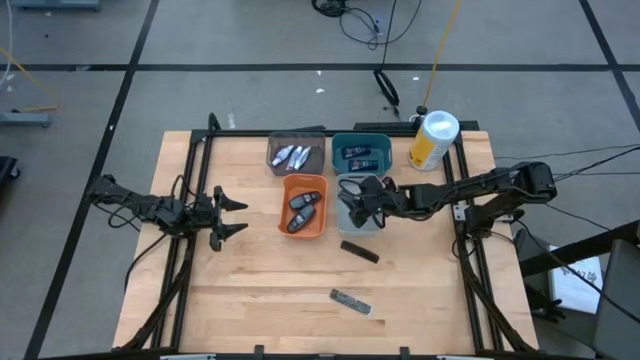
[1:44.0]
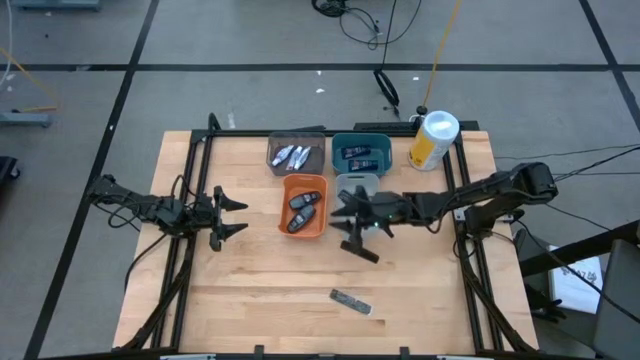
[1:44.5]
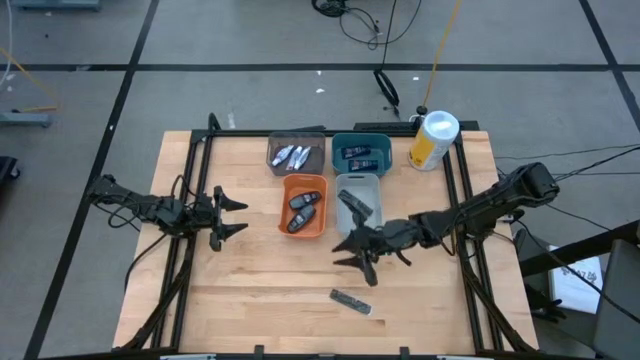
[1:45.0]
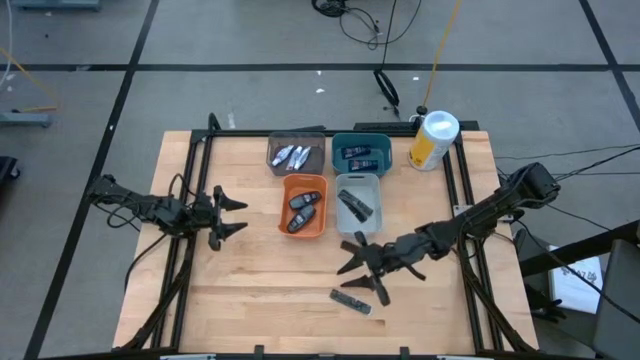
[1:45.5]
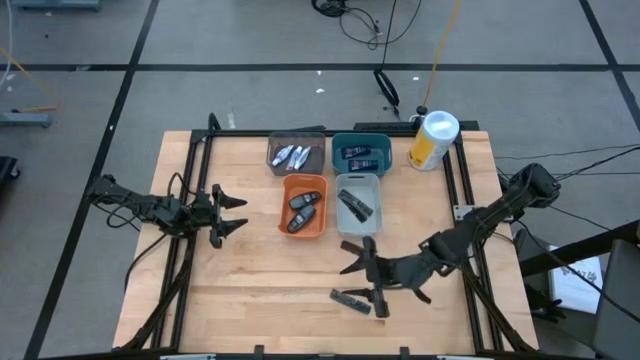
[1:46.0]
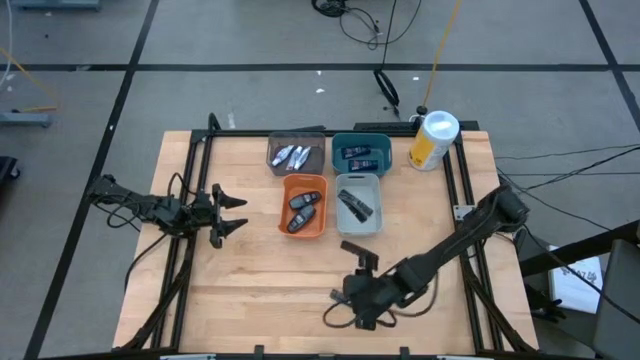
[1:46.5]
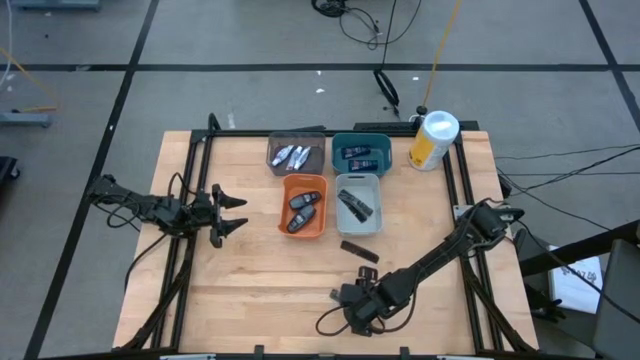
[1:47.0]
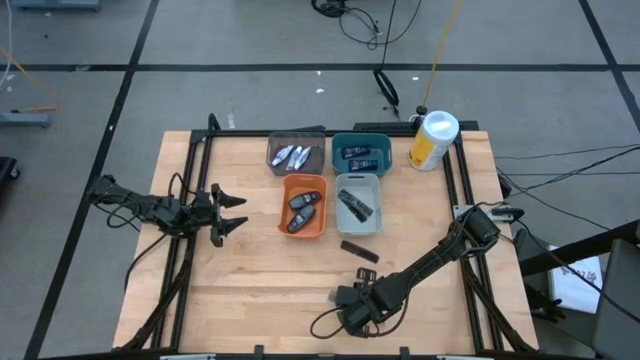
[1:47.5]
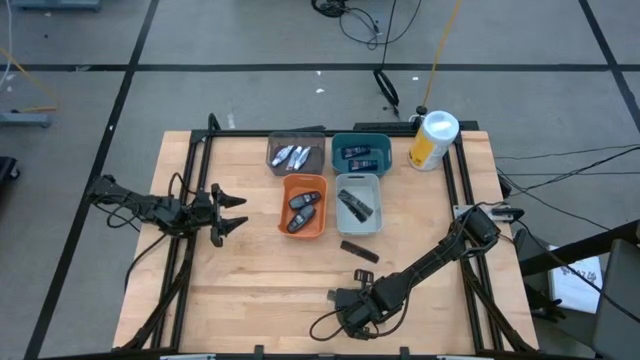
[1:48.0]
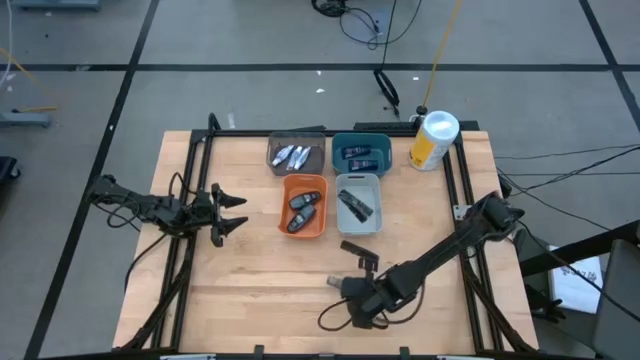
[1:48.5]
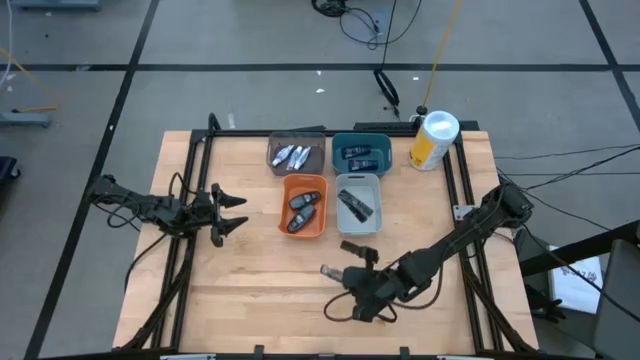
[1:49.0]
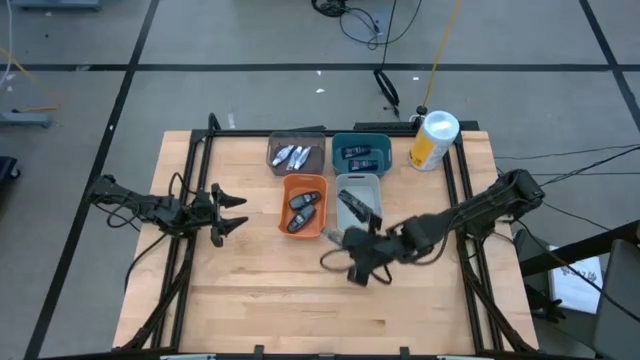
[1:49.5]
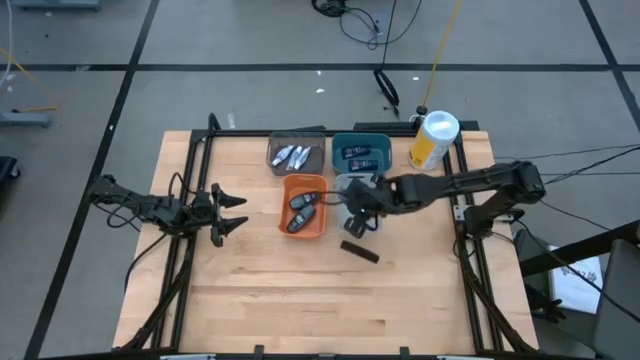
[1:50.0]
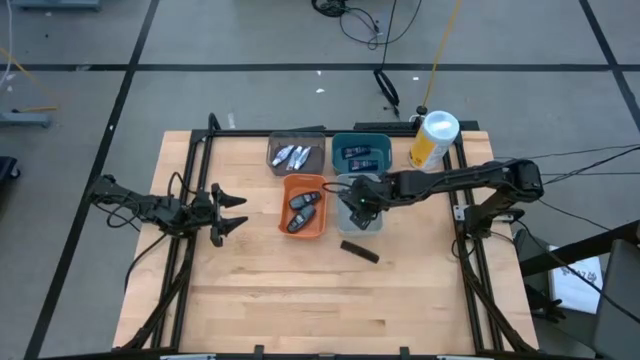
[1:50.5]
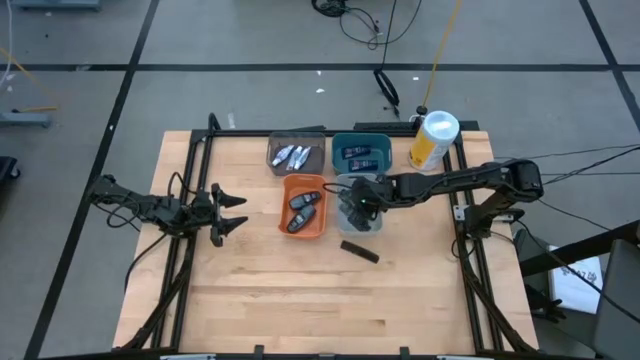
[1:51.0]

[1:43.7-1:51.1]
Task: Pick & Place Travel size toiletries
Put the black comb into the gray bin

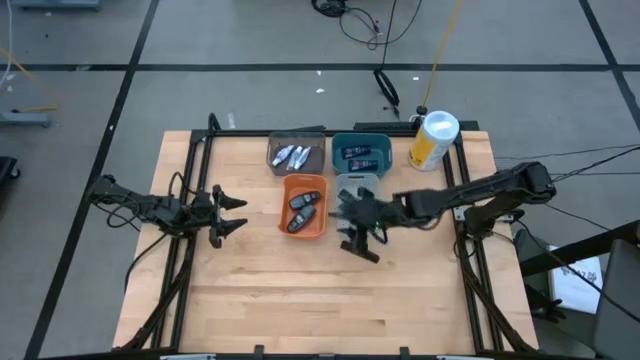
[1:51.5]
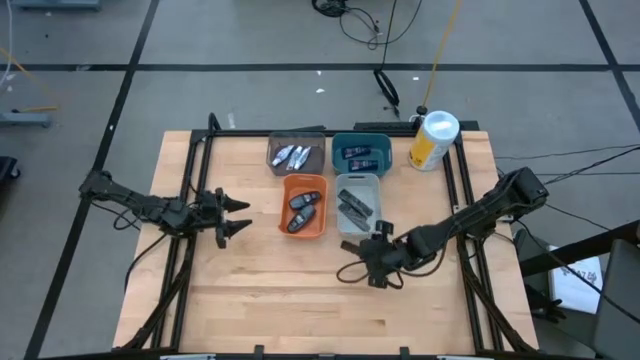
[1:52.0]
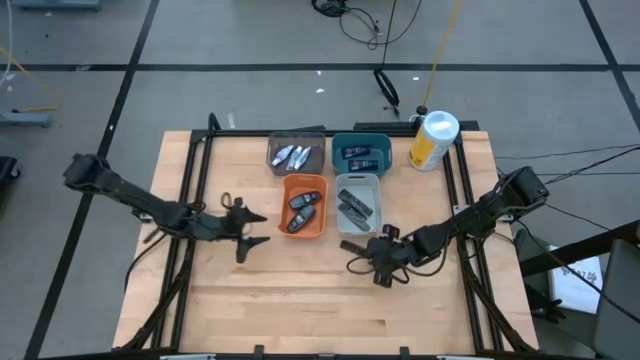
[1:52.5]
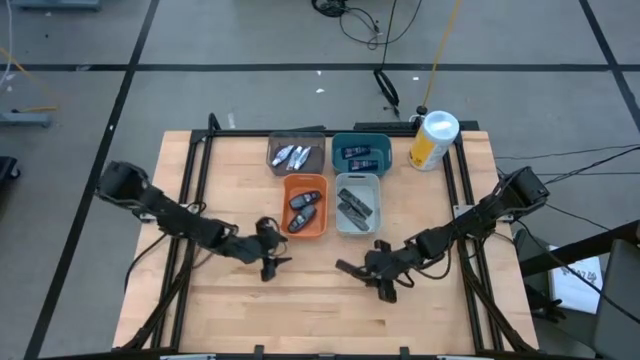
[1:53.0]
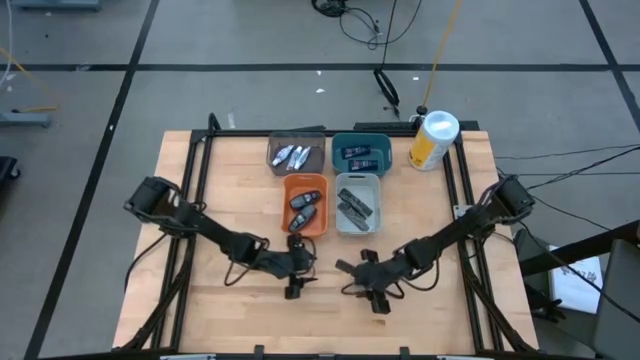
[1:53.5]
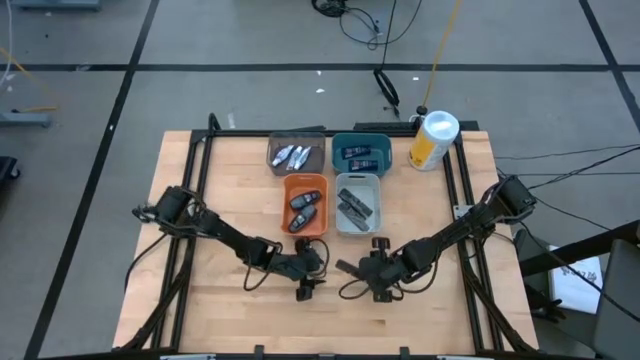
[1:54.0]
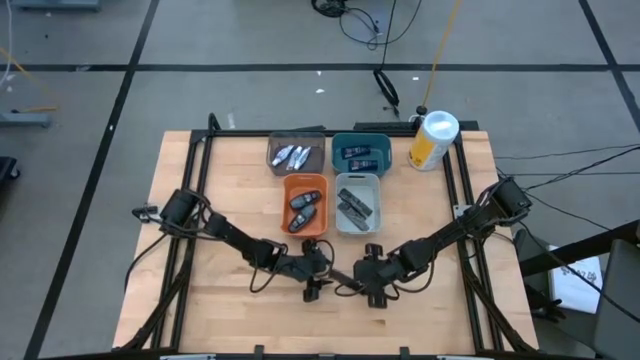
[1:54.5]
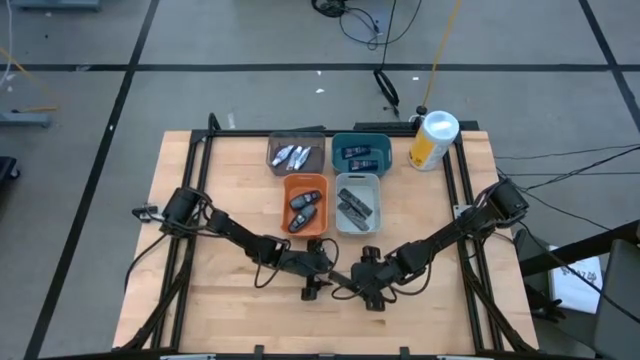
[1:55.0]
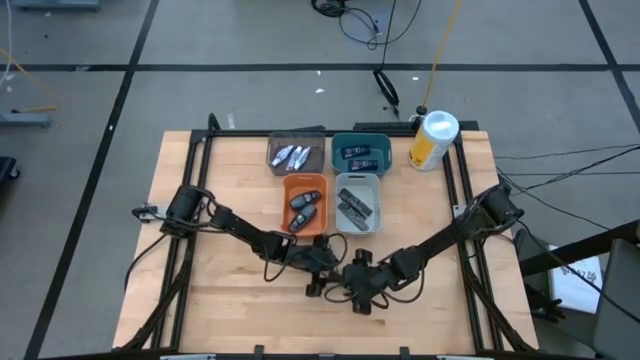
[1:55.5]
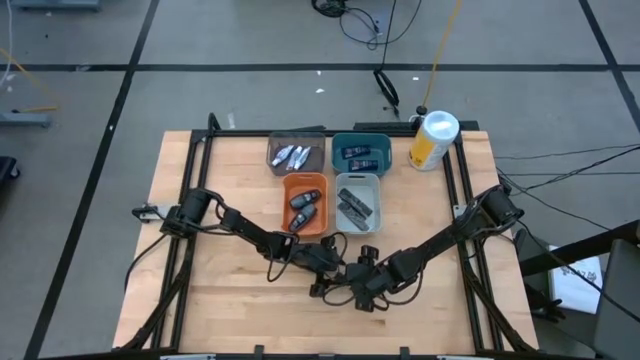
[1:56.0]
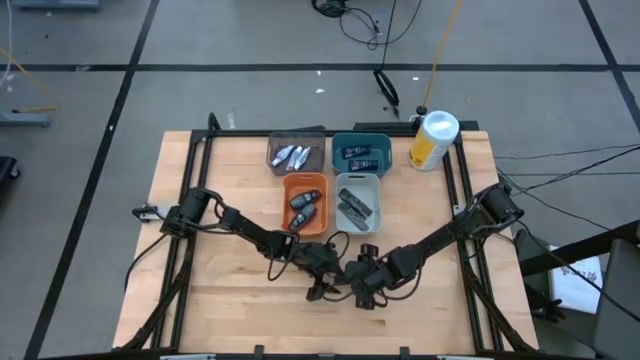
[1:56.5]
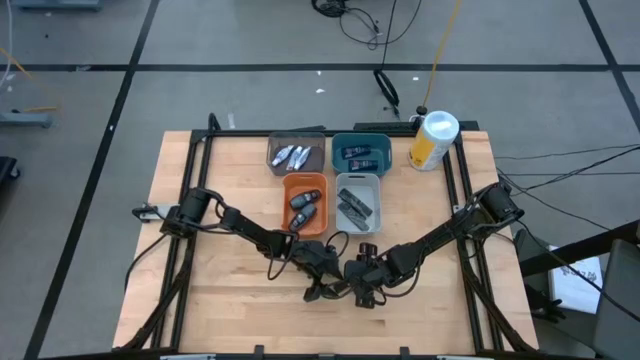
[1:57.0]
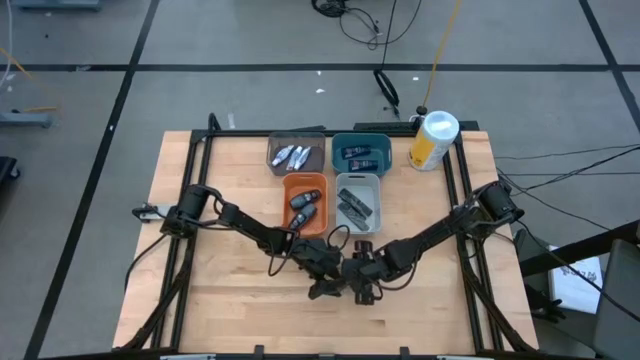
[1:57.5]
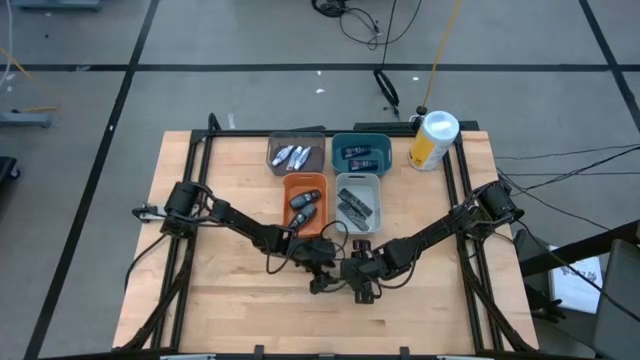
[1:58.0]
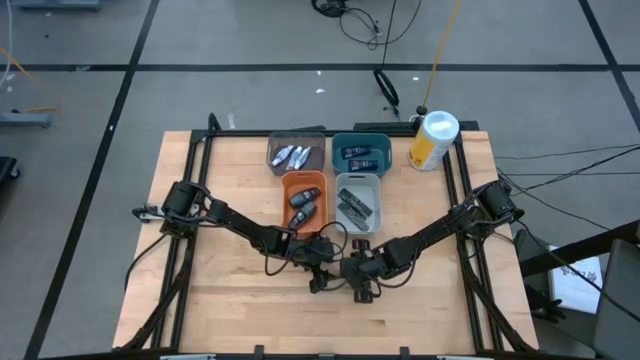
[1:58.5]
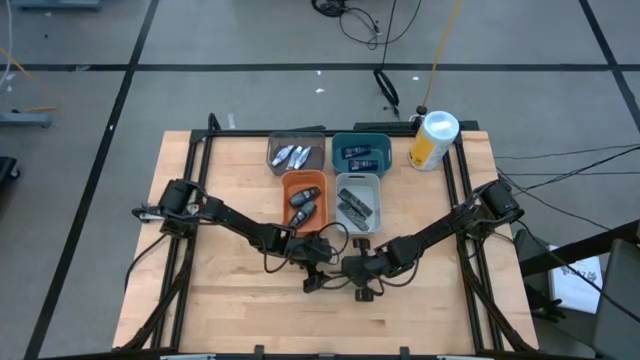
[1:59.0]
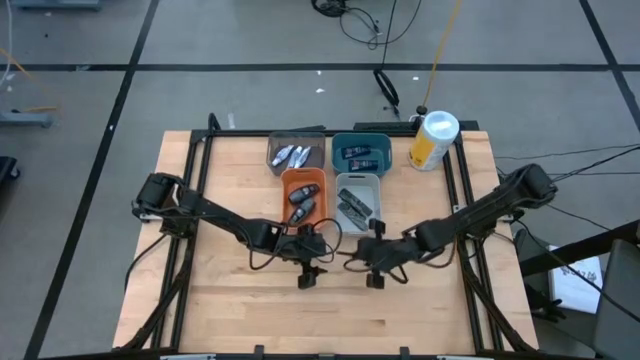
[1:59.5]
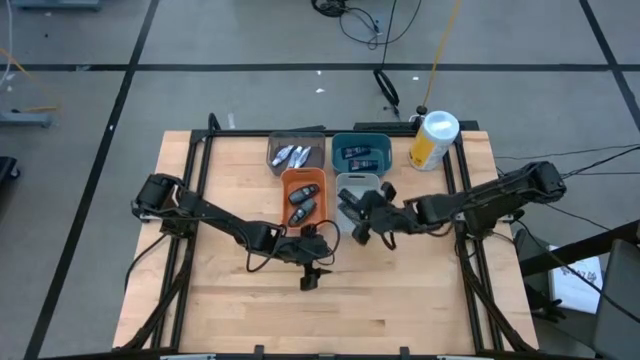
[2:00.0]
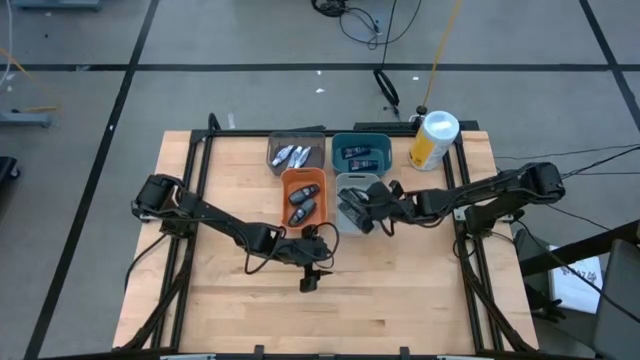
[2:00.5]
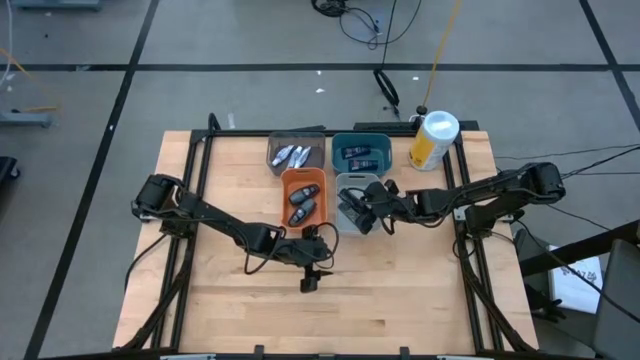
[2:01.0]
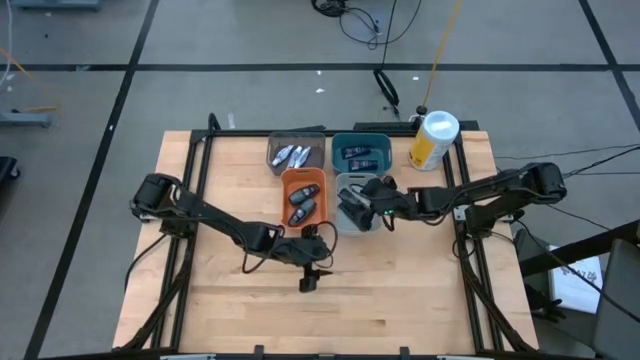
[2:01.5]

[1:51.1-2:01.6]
Put the black comb into the gray bin

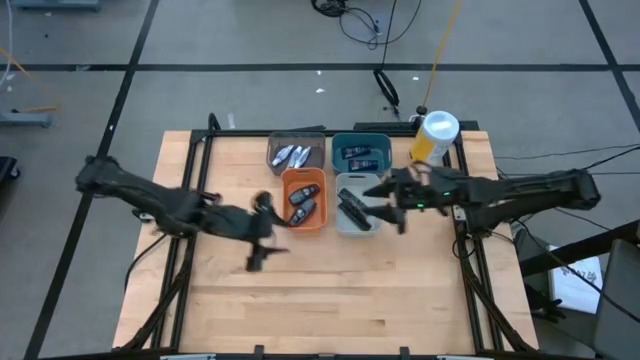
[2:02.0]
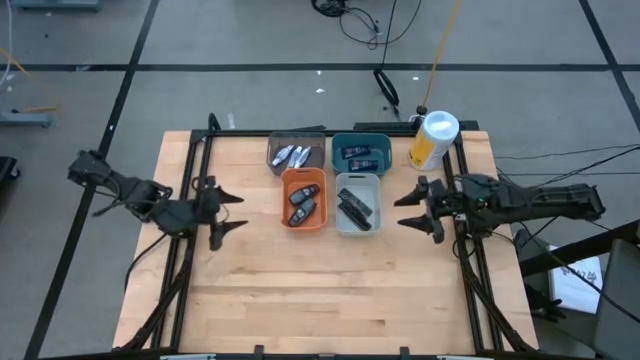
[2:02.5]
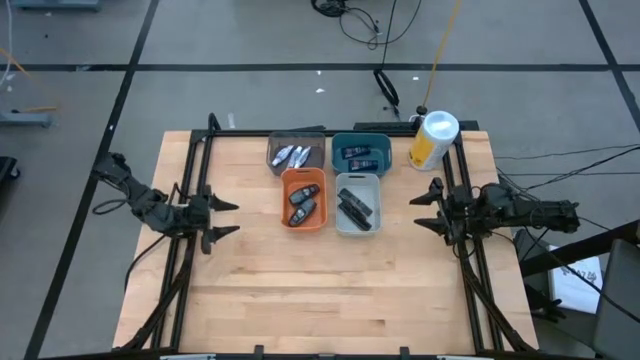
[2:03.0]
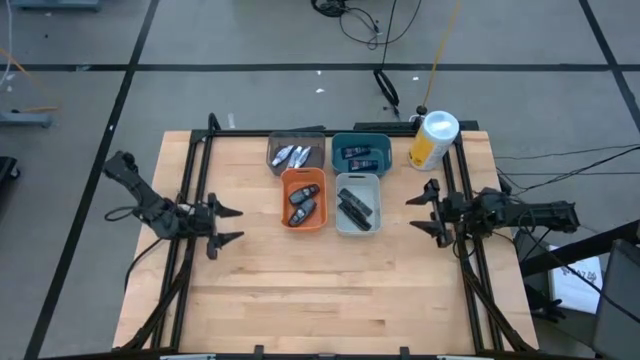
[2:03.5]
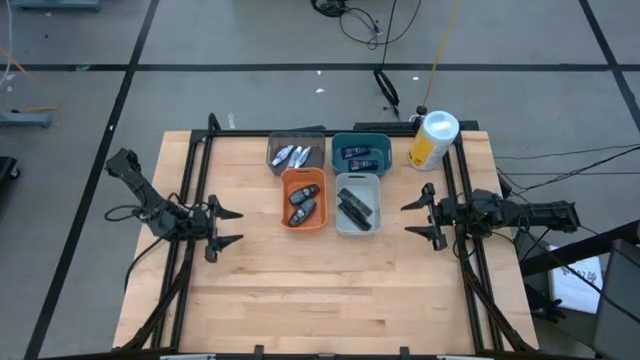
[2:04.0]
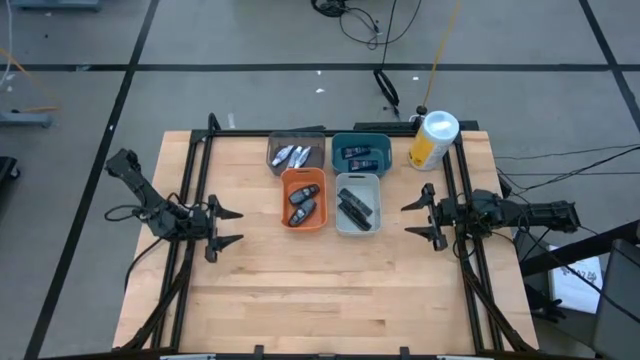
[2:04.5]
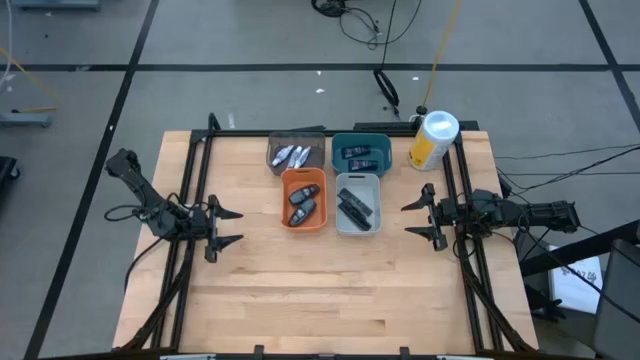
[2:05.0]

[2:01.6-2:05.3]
Return to Home Position

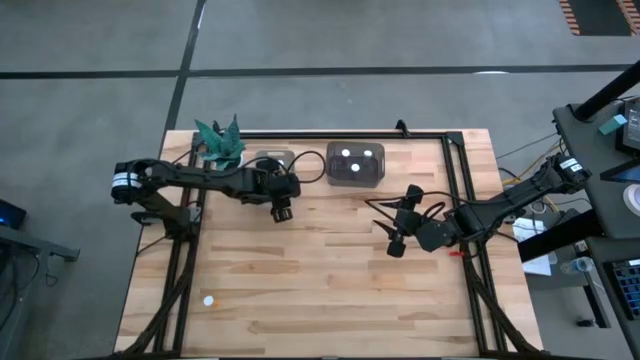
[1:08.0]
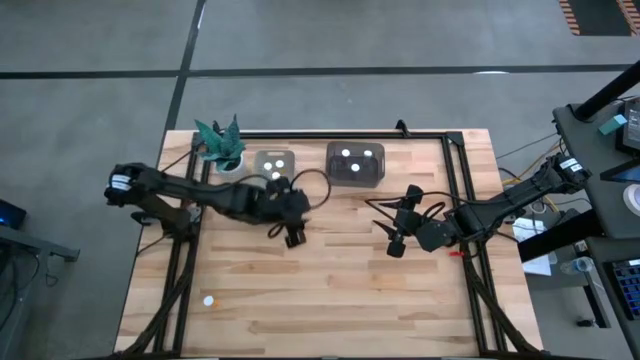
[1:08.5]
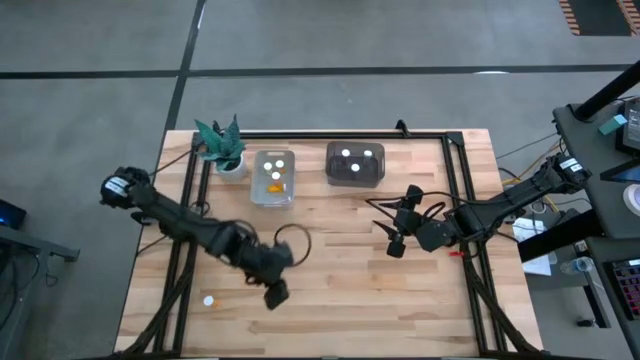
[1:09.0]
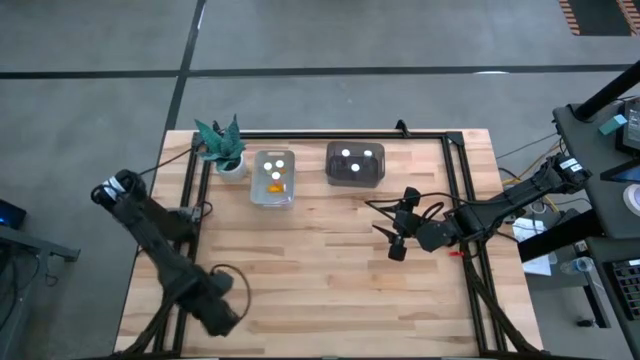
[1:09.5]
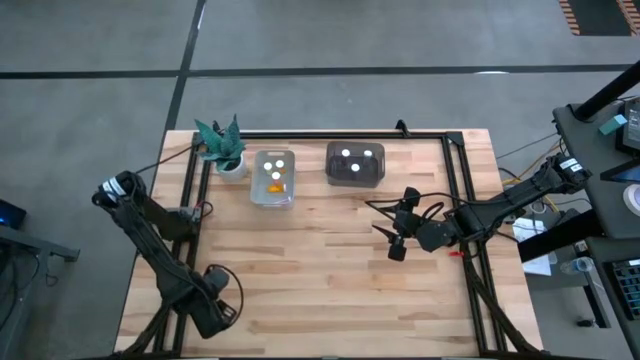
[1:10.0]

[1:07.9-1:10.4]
Task: Pick and place medicine bottles into bin by pill shape (circle, oval)
Put the top orange tablet bottle into the gray bin
